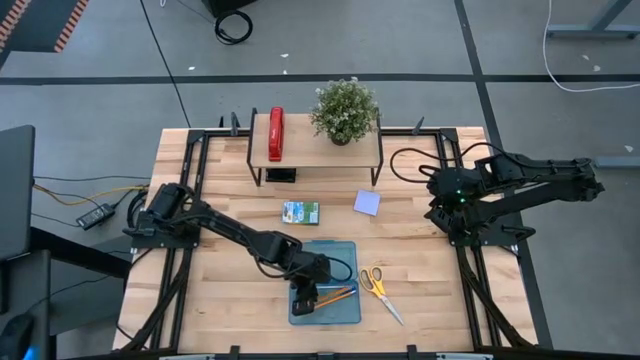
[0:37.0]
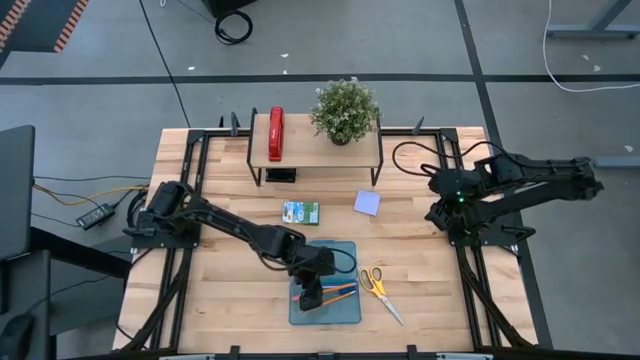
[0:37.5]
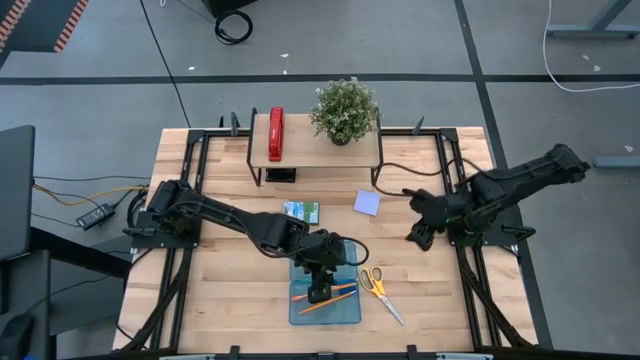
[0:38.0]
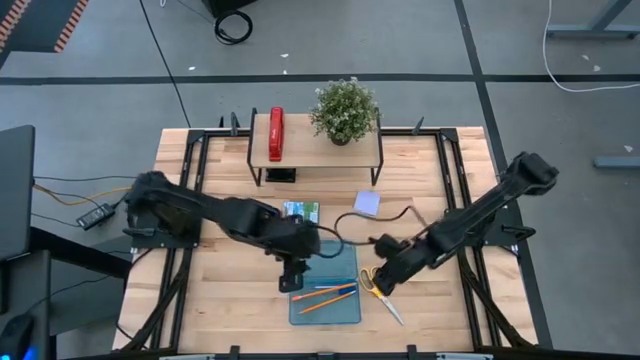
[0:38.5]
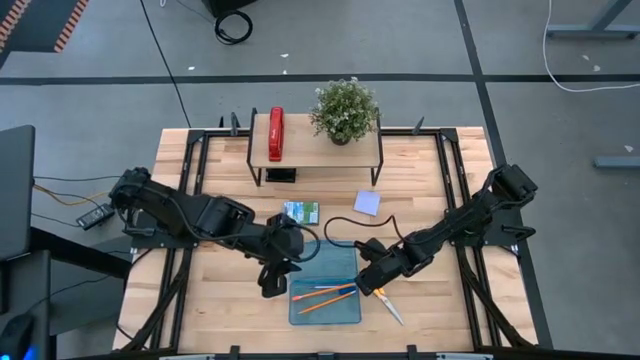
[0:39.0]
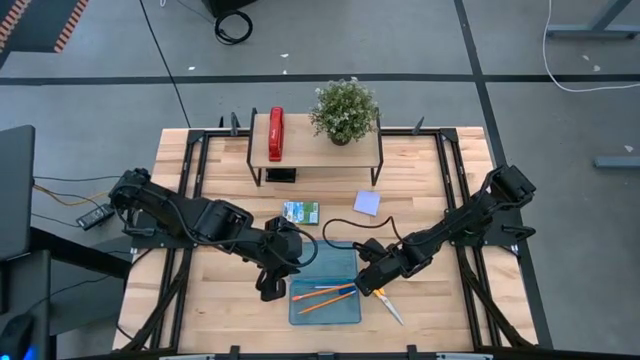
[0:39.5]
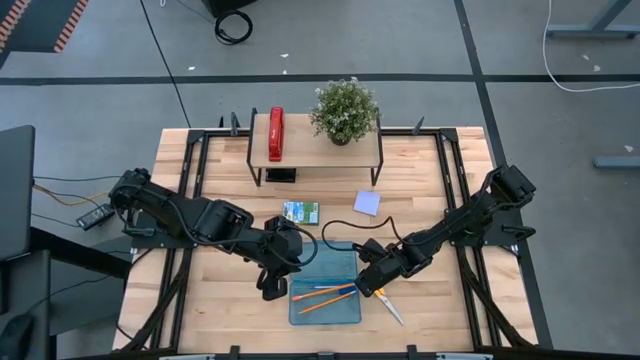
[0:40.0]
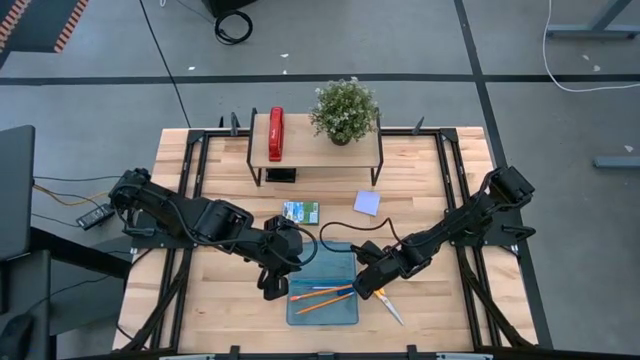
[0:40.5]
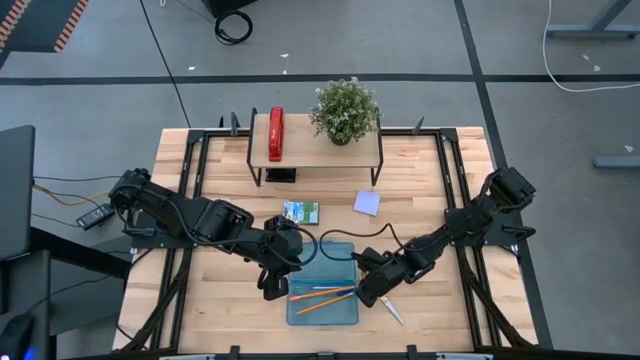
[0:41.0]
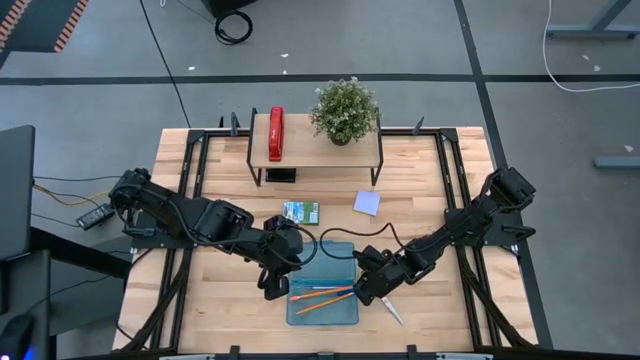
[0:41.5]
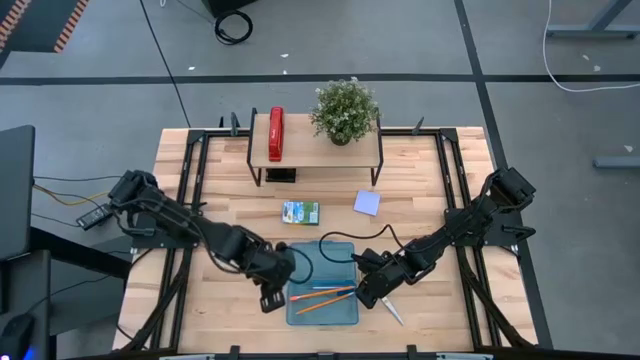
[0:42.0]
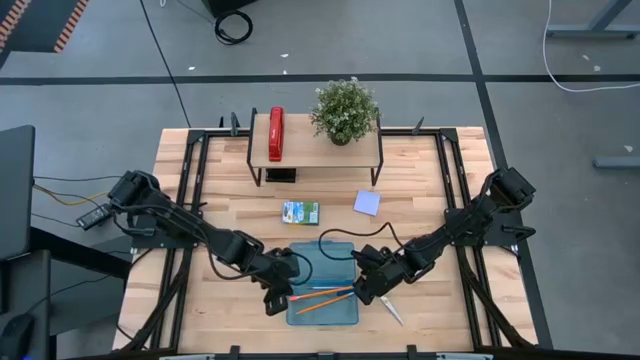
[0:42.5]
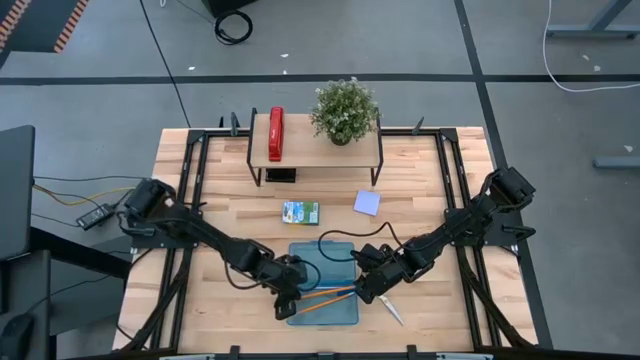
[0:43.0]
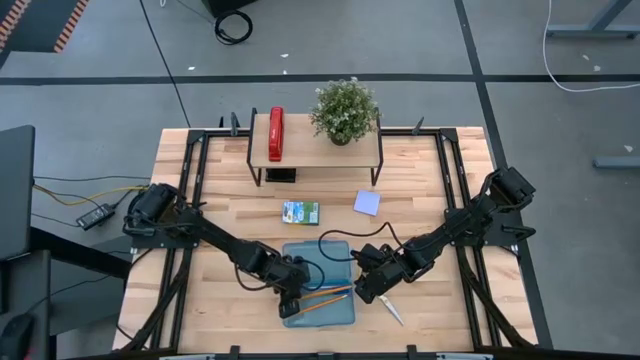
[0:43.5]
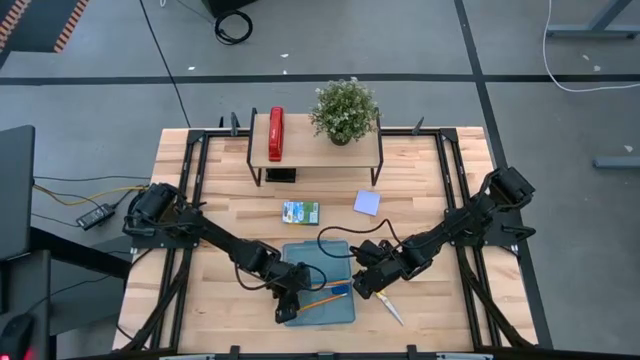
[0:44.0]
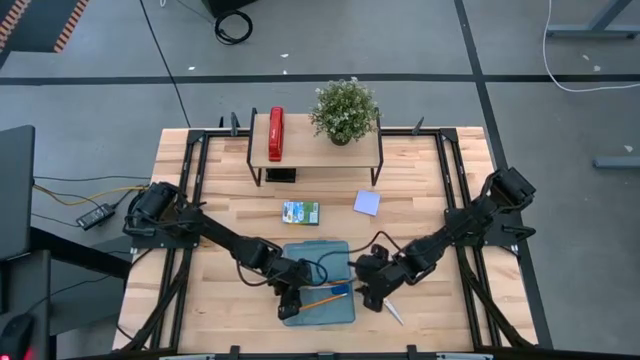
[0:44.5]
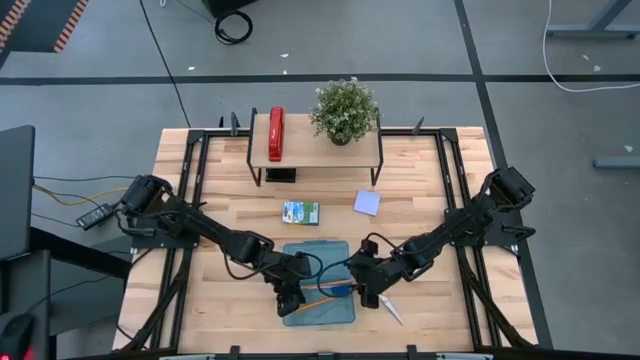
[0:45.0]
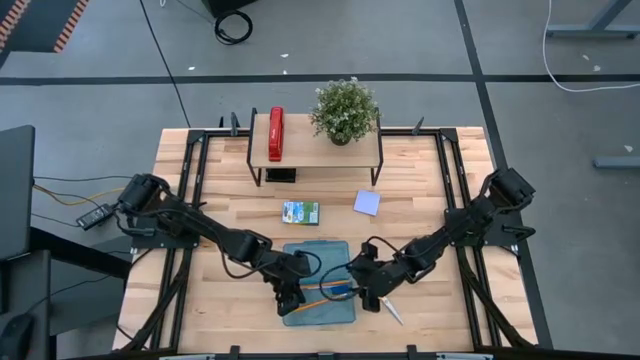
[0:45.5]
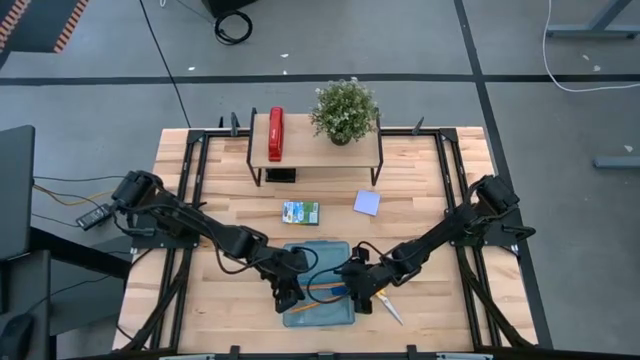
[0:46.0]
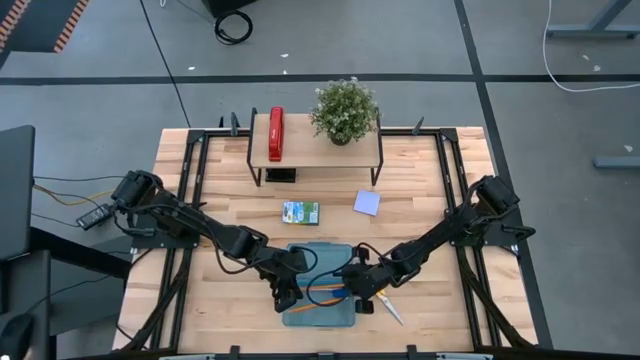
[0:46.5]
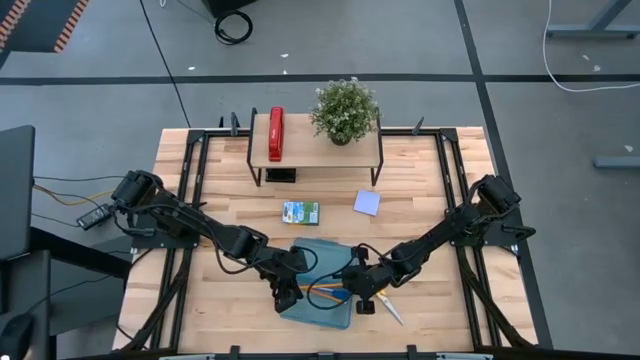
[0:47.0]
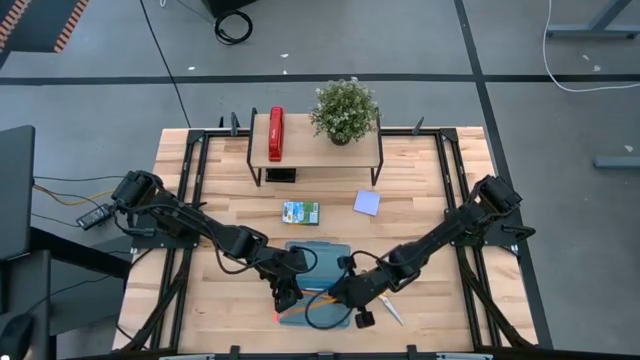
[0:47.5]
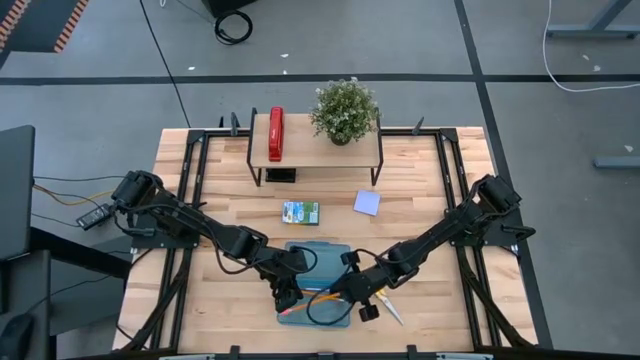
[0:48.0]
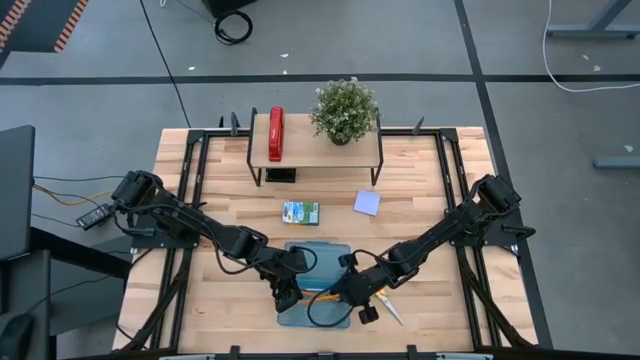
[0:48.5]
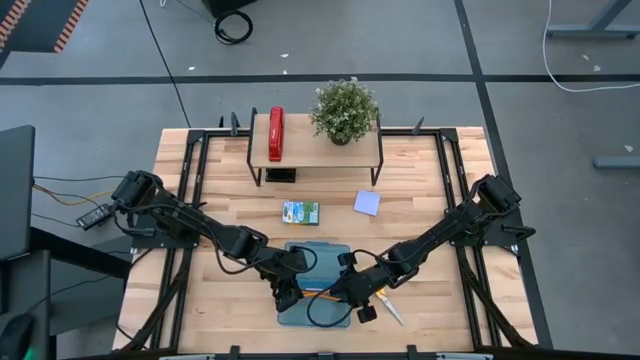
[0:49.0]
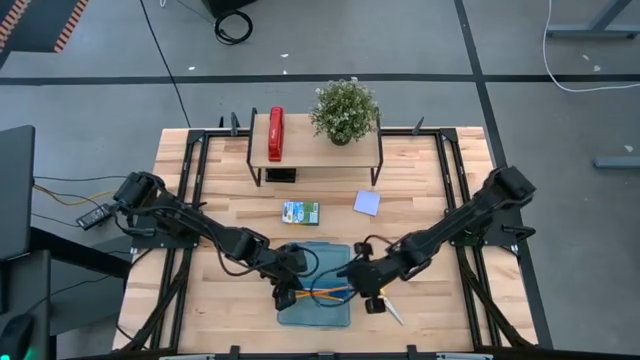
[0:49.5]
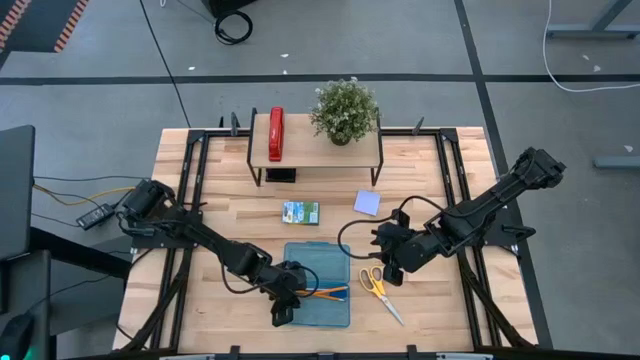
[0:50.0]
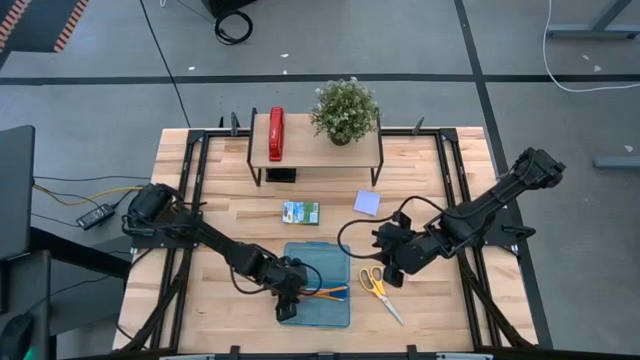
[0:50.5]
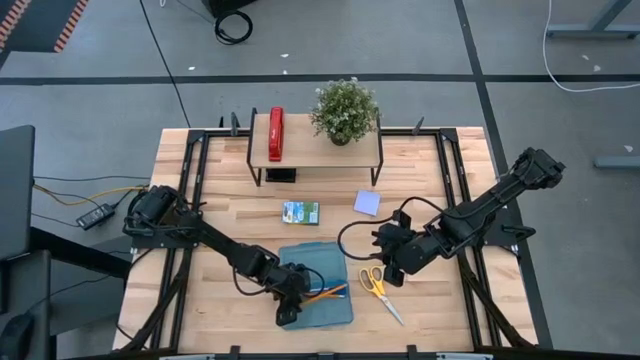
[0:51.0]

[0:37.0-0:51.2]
Task: Pack school essentials
Adjust the pencils in the blue supply box

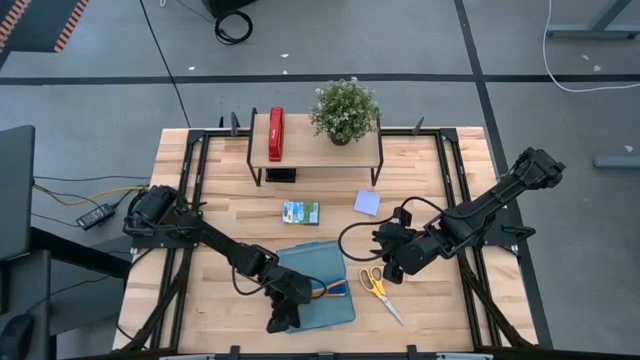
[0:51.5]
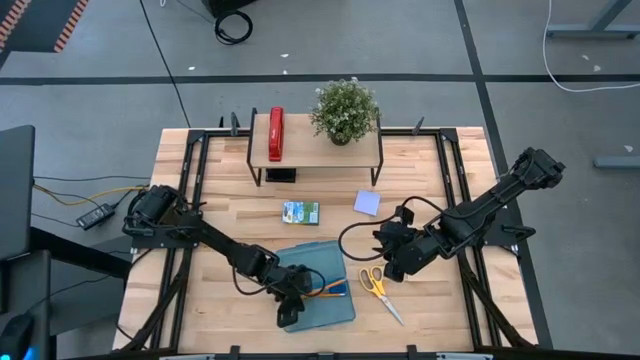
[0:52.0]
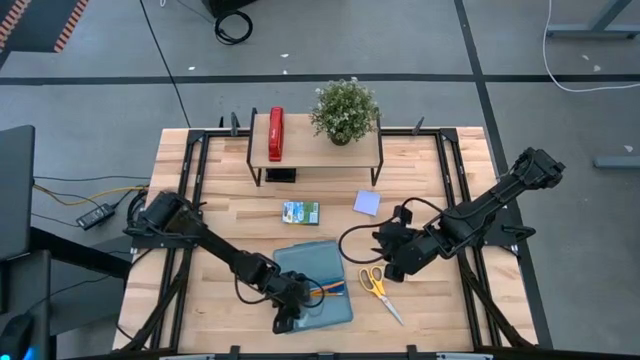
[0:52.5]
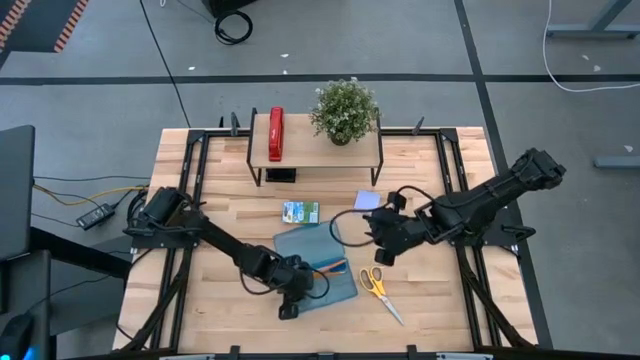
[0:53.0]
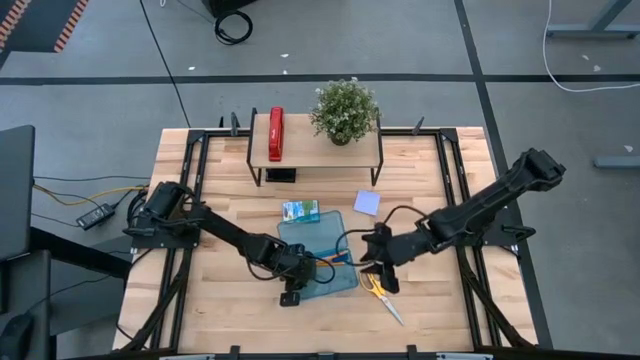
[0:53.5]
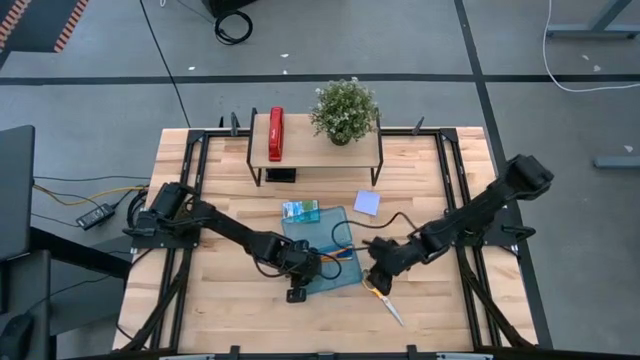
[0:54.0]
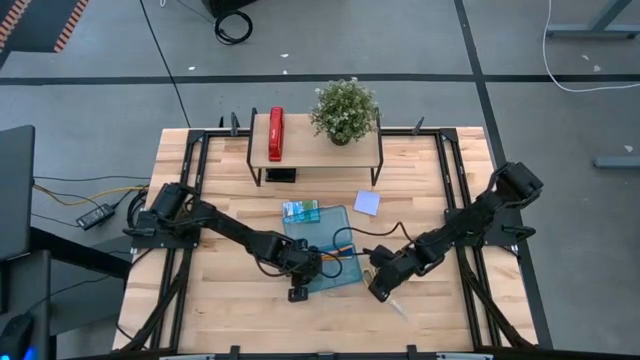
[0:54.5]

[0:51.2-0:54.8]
Adjust the blue supply box

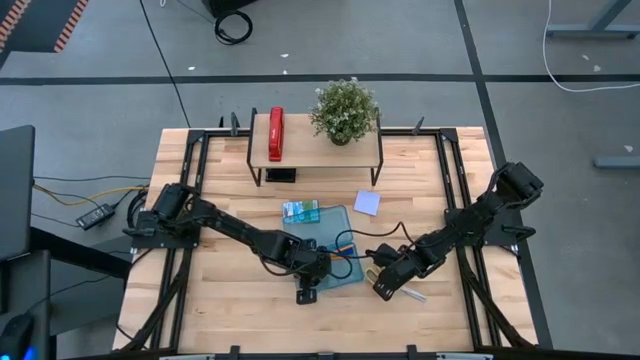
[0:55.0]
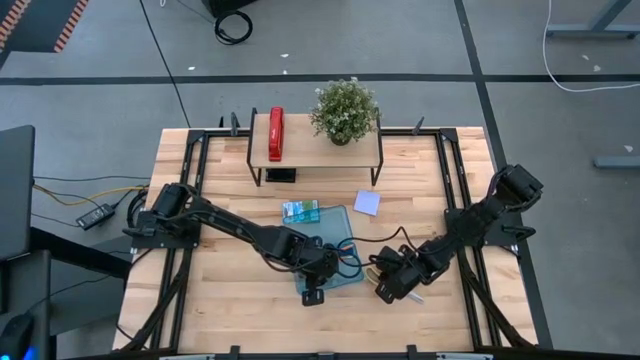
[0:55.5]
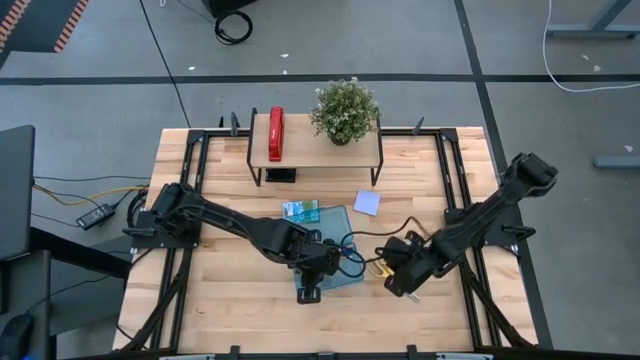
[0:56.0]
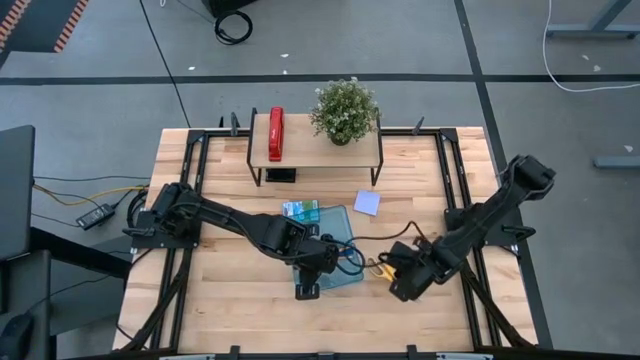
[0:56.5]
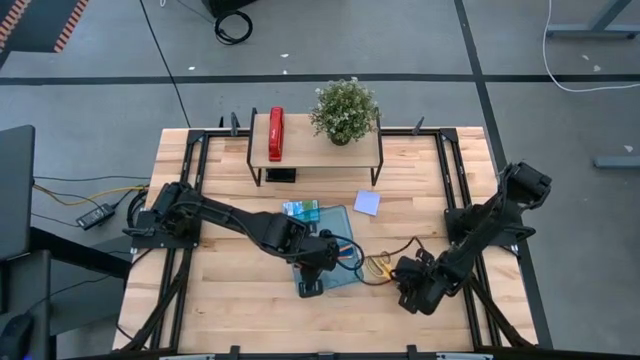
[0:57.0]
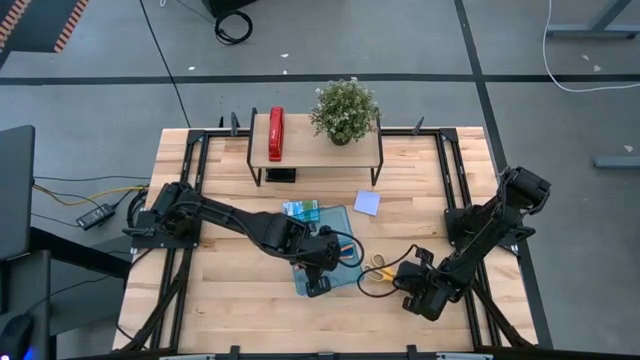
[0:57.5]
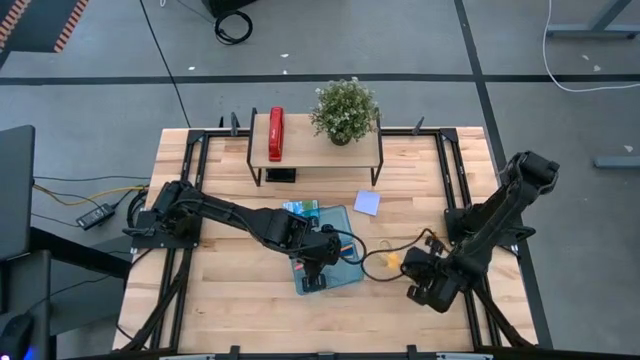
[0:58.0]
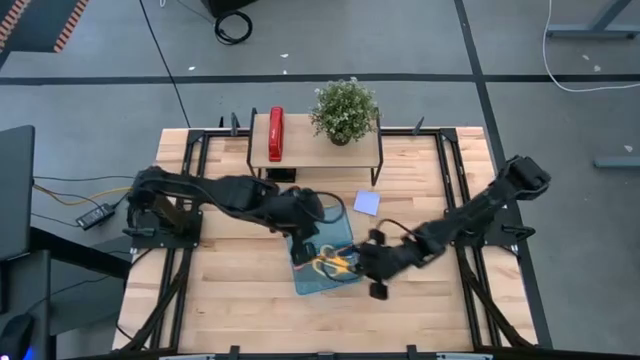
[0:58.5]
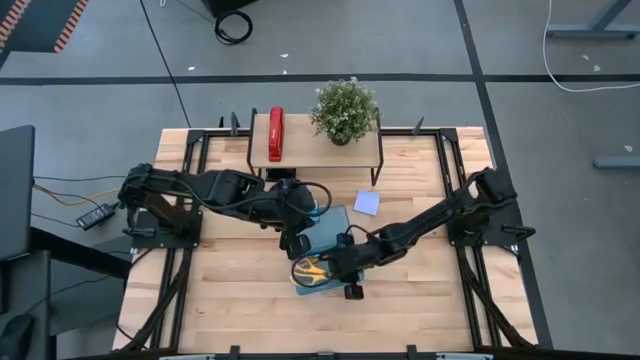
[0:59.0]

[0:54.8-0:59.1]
Put the yellow scissors into the blue supply box
